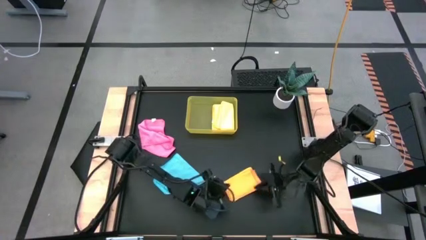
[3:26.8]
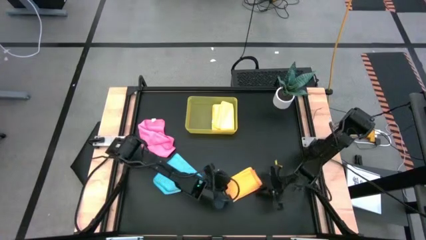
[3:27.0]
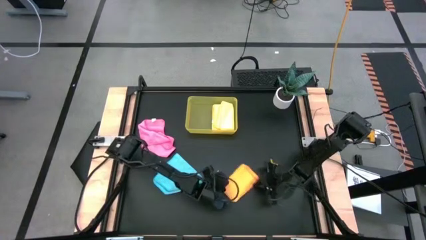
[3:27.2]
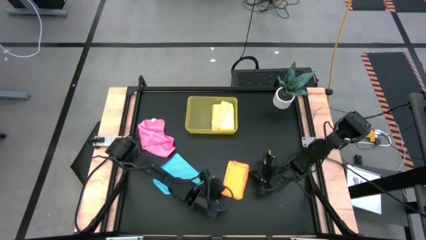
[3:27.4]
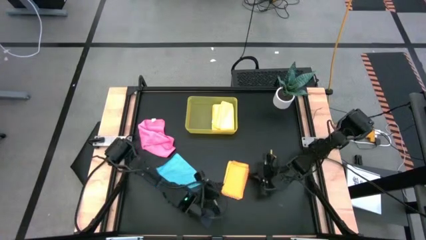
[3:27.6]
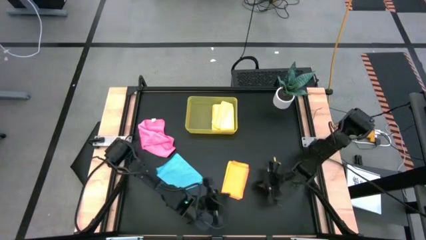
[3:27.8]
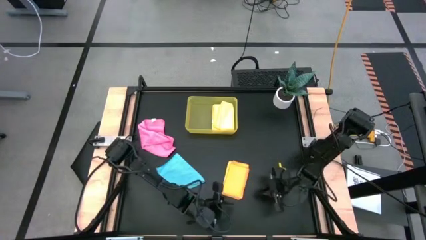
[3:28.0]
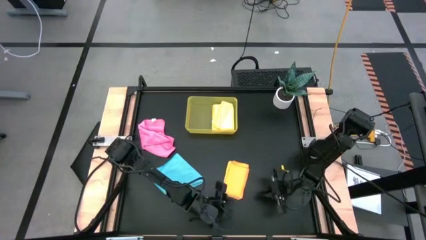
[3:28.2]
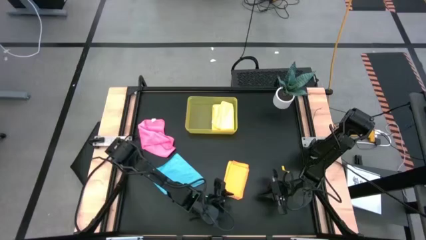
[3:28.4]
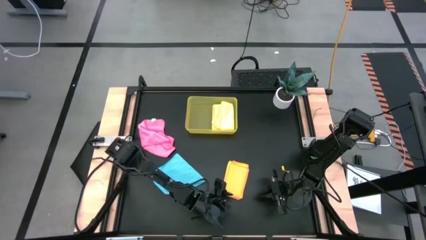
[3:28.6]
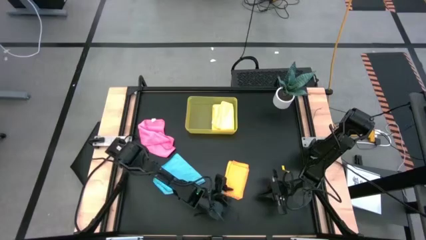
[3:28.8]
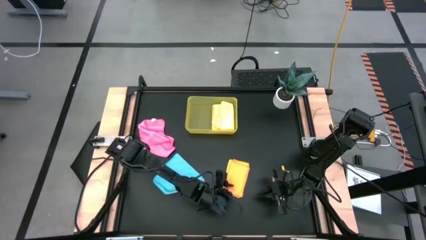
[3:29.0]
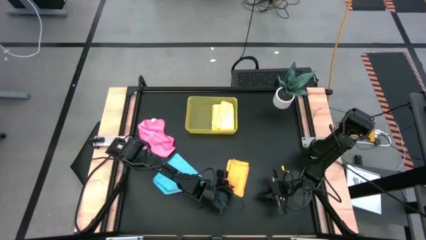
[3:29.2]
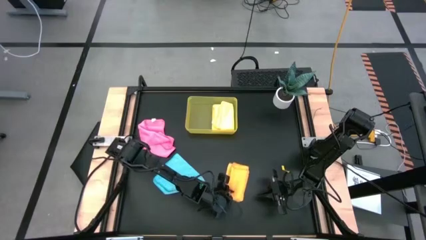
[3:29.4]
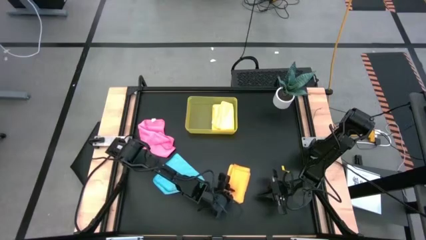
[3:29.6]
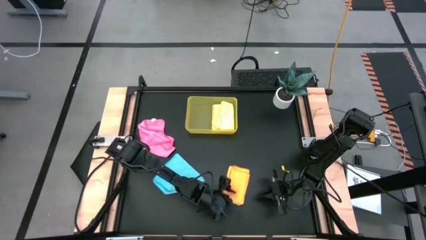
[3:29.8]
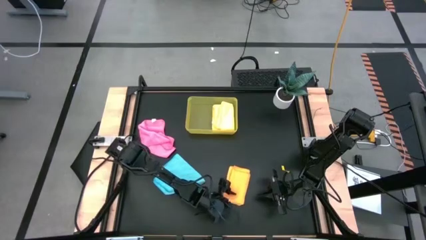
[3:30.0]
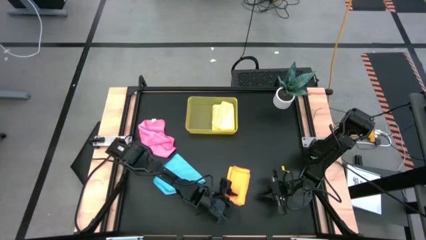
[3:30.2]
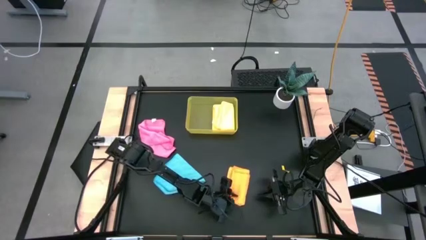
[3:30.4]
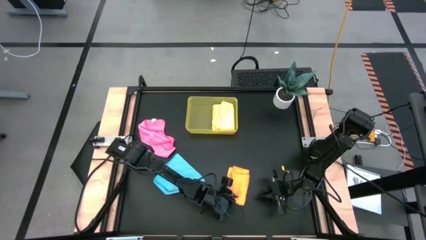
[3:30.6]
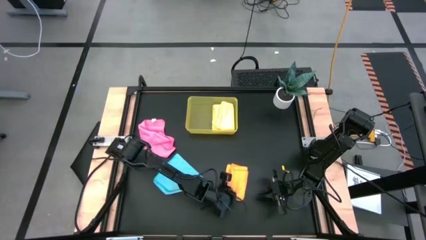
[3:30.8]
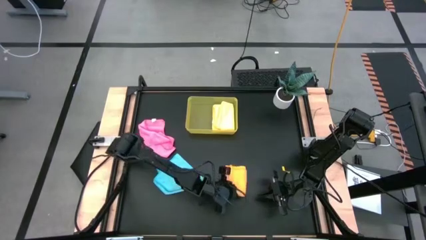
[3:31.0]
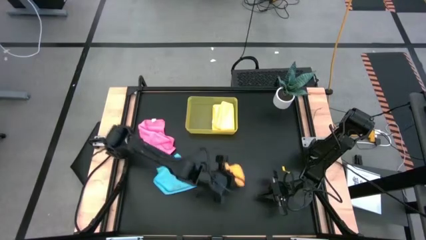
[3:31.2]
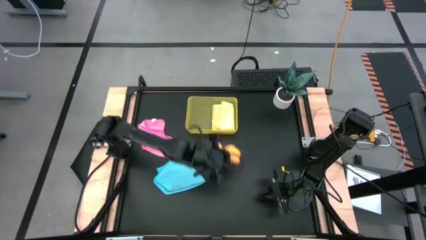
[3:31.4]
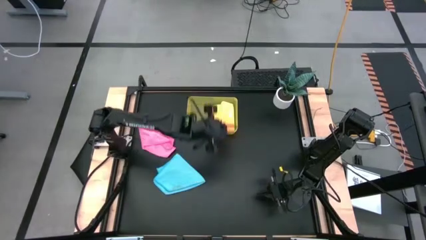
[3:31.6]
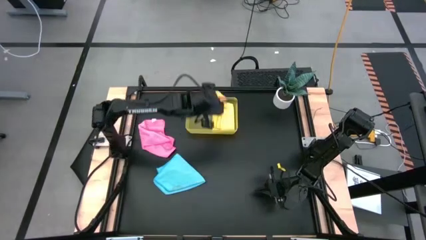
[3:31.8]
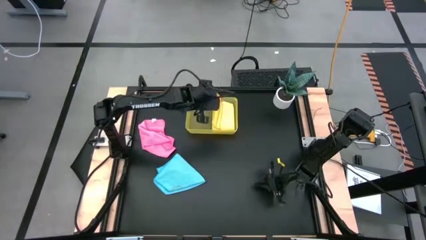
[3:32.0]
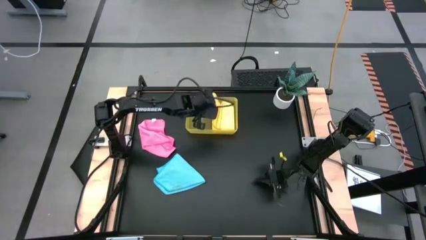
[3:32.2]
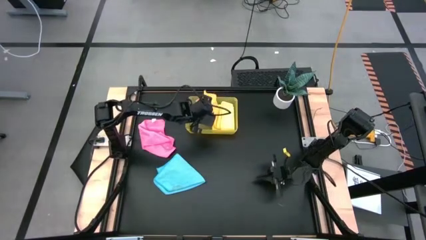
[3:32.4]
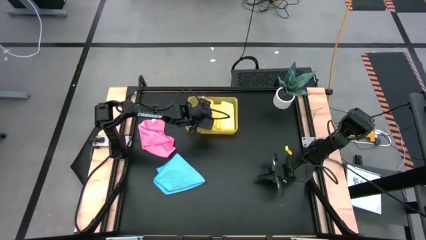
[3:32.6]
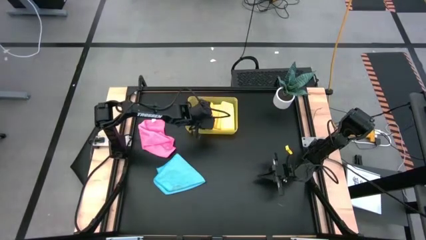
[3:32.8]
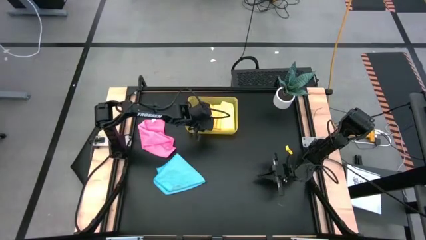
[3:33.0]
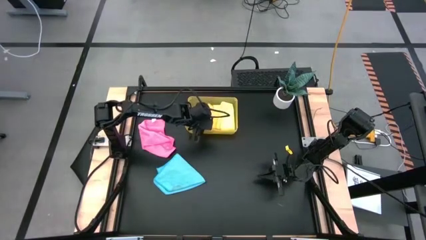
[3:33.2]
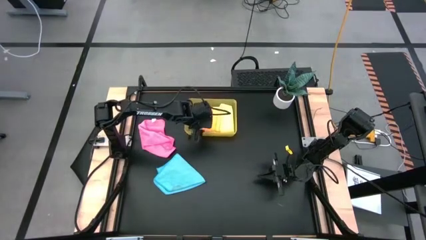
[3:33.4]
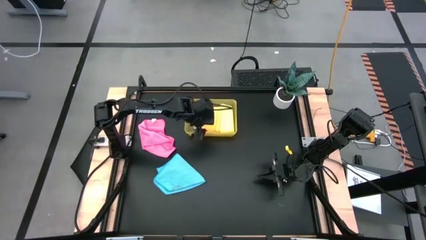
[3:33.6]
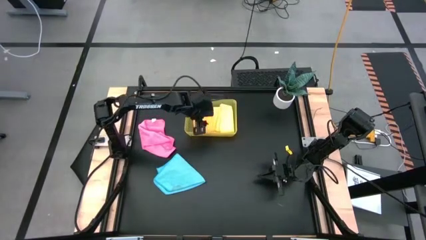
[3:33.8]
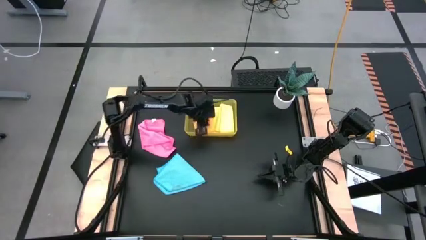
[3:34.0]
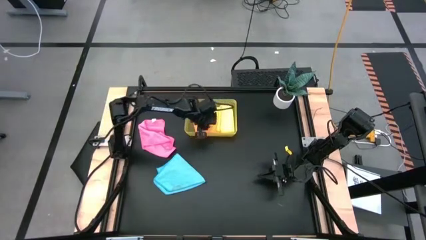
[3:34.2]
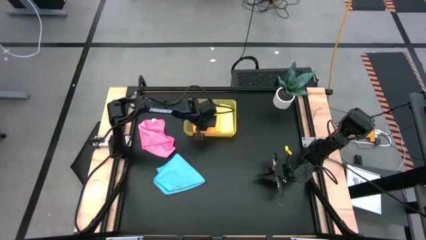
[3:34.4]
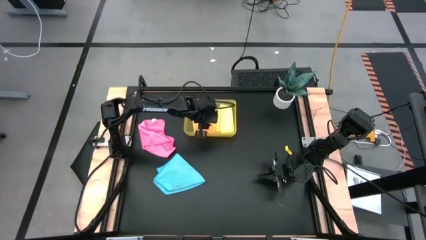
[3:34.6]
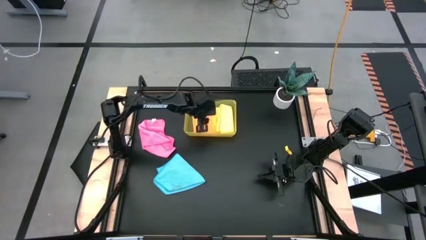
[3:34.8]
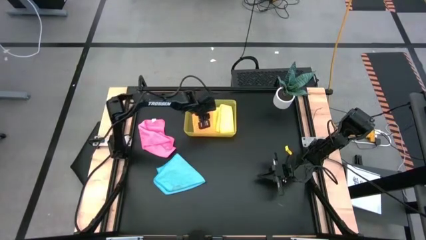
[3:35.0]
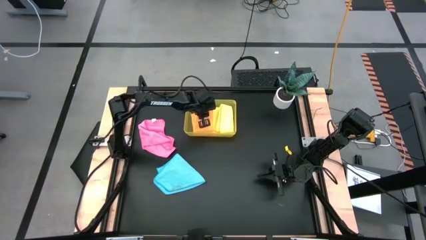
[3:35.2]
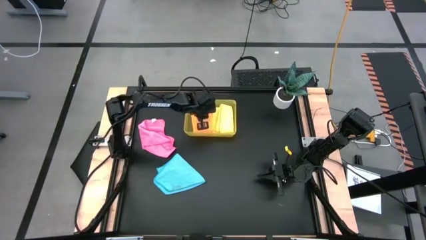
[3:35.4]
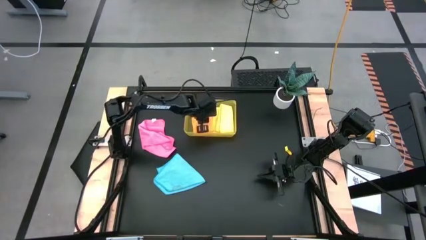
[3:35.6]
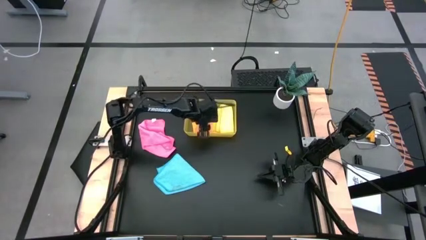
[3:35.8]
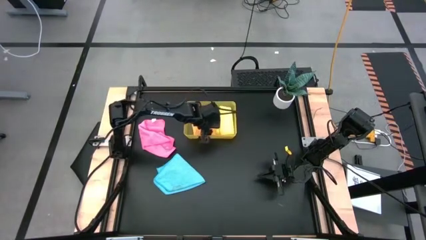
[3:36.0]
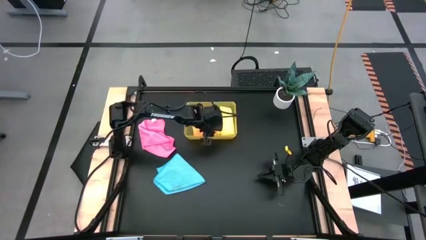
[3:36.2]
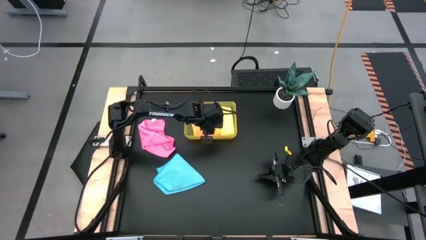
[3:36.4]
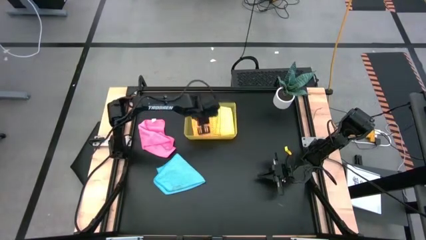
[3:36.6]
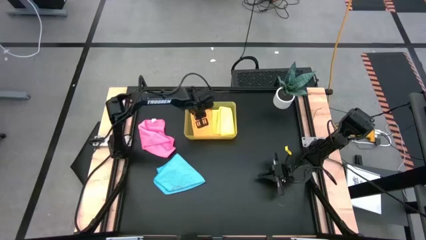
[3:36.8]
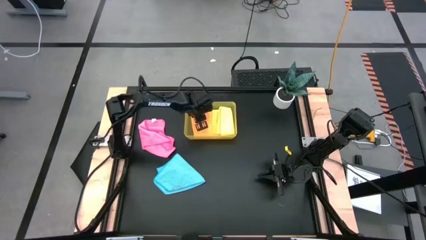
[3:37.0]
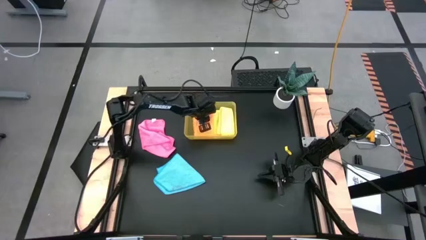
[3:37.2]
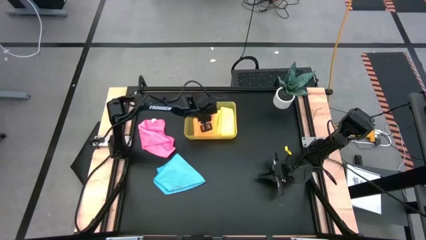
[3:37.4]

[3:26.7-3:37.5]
Task: Fold microfiber towels
Put the orange folded microfiber cloth in the yellow bin
